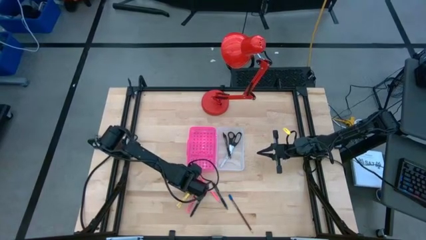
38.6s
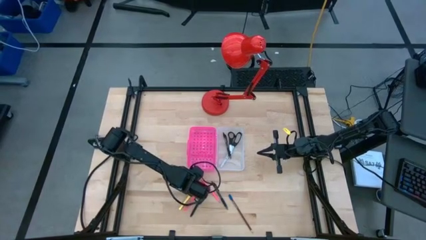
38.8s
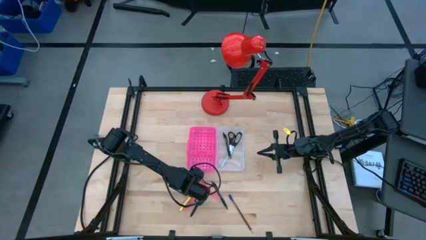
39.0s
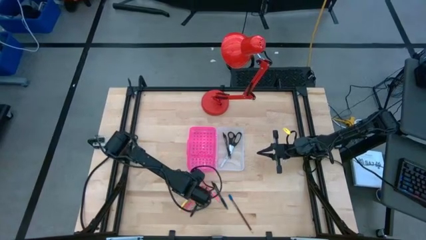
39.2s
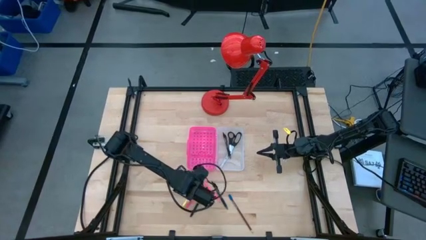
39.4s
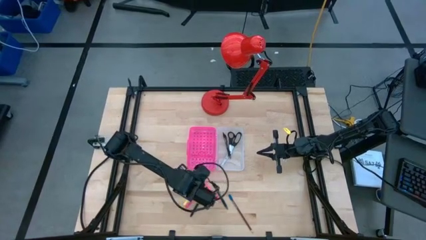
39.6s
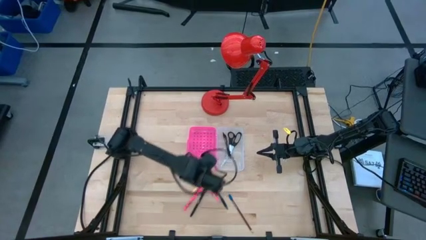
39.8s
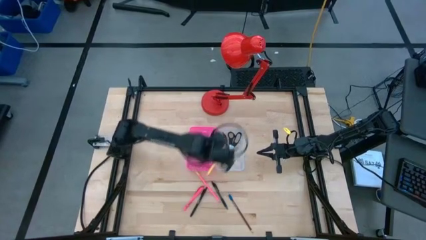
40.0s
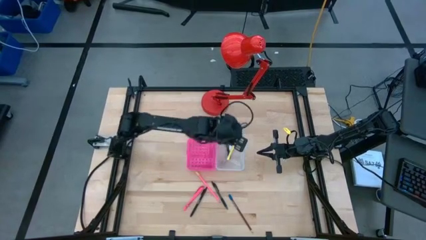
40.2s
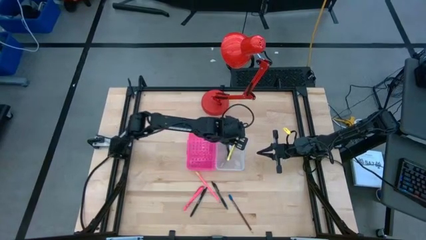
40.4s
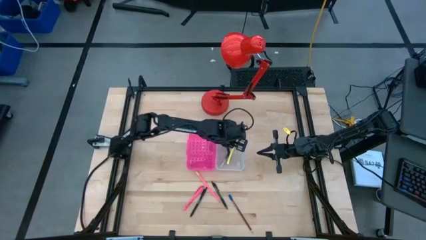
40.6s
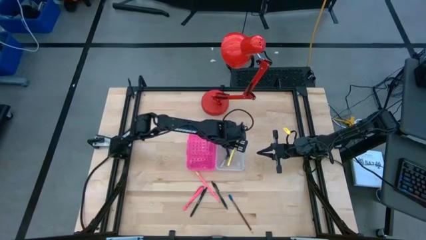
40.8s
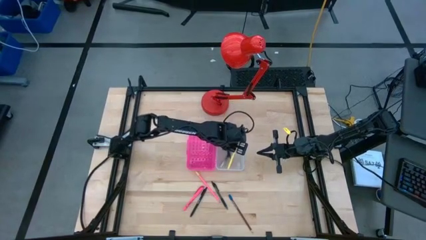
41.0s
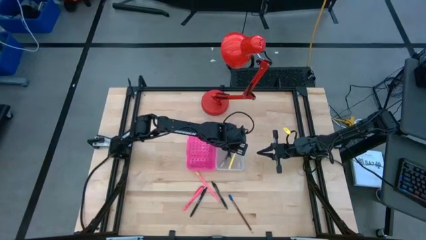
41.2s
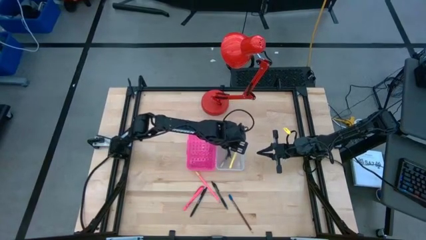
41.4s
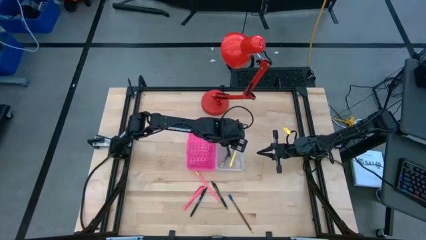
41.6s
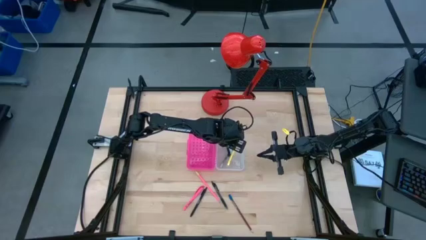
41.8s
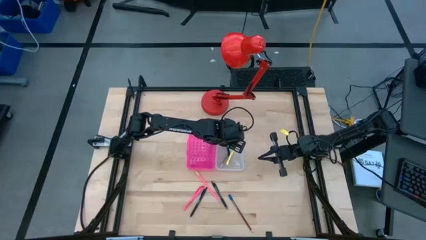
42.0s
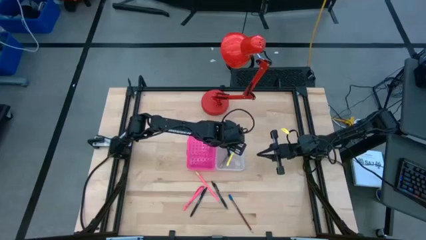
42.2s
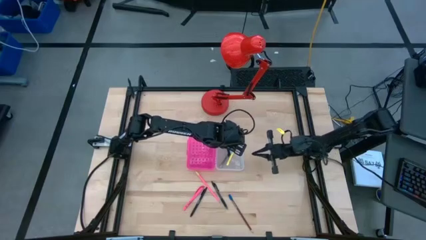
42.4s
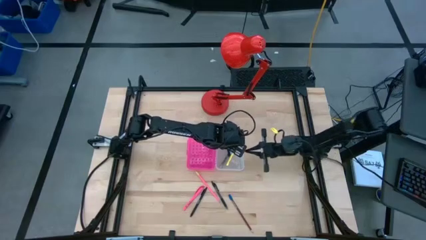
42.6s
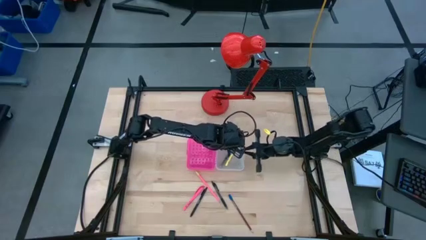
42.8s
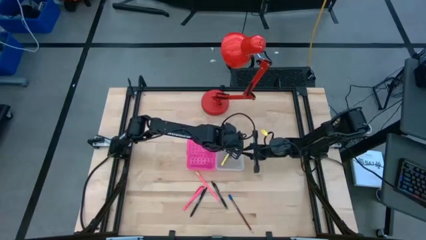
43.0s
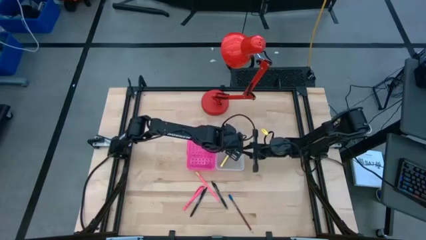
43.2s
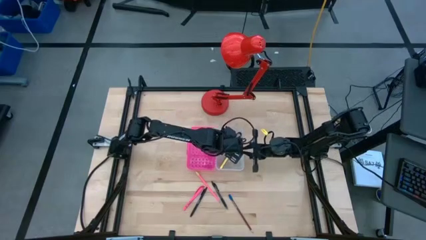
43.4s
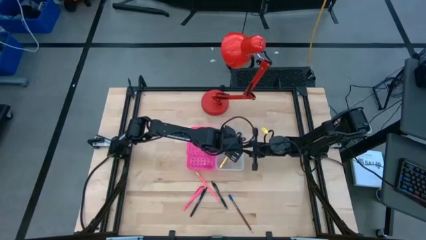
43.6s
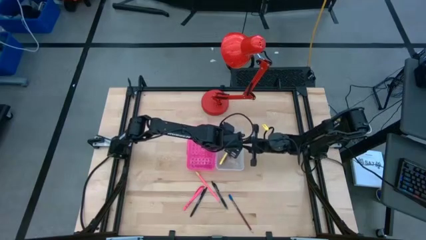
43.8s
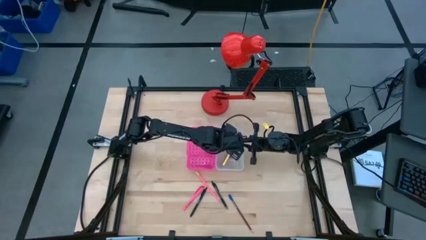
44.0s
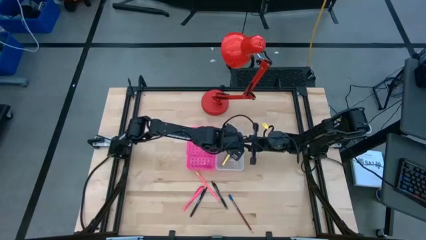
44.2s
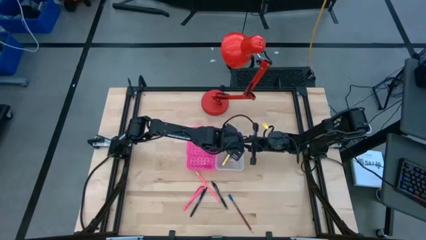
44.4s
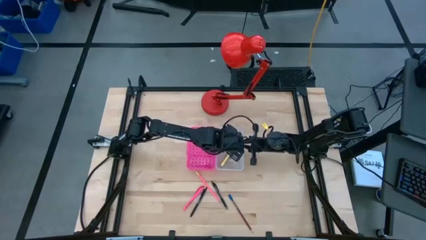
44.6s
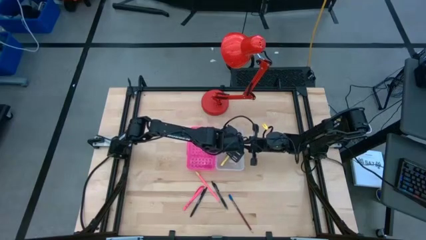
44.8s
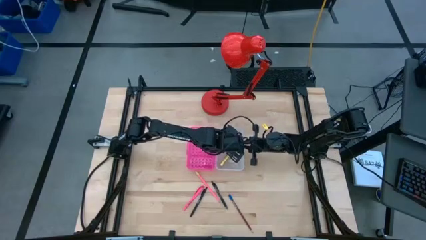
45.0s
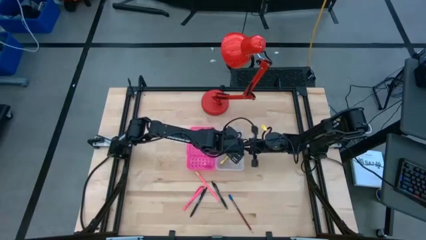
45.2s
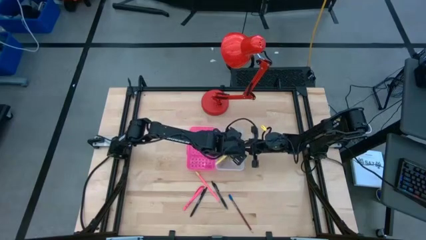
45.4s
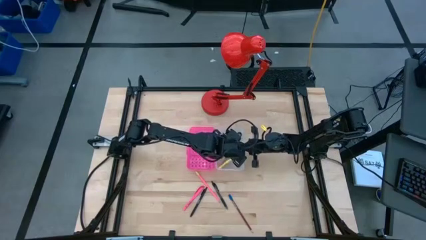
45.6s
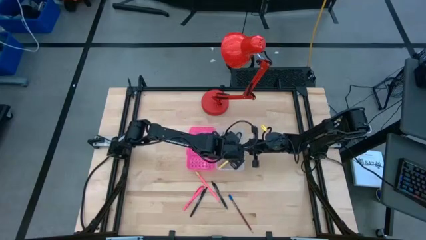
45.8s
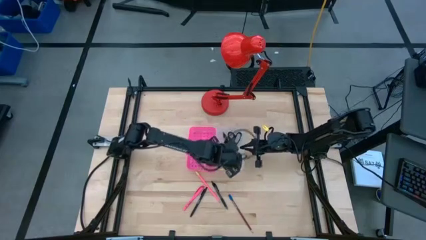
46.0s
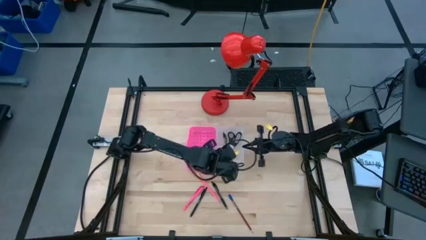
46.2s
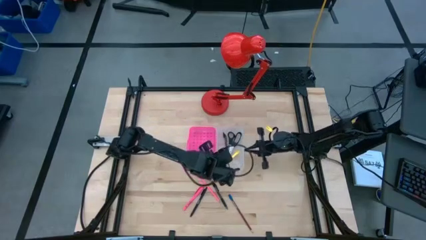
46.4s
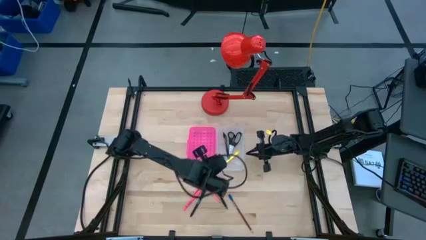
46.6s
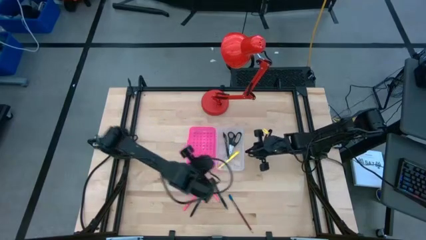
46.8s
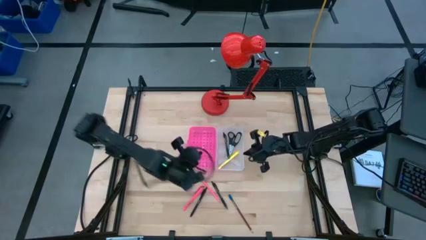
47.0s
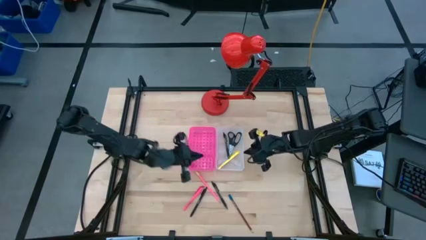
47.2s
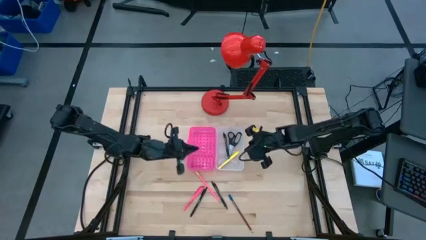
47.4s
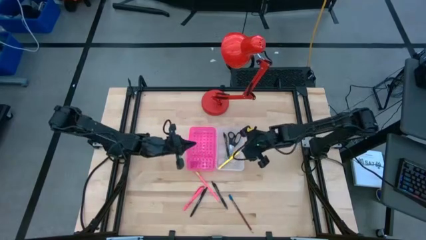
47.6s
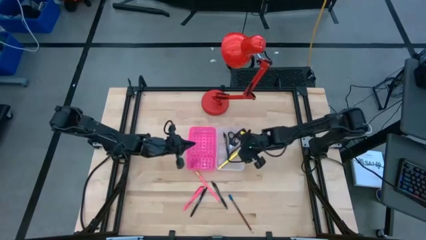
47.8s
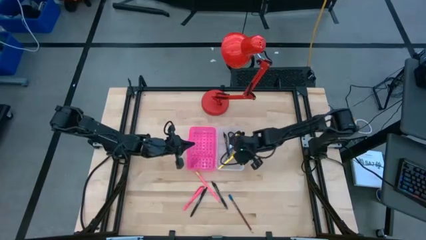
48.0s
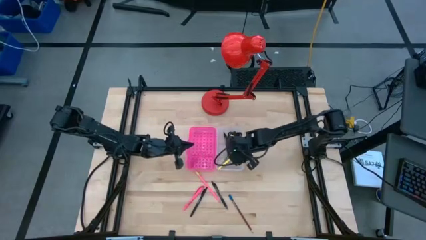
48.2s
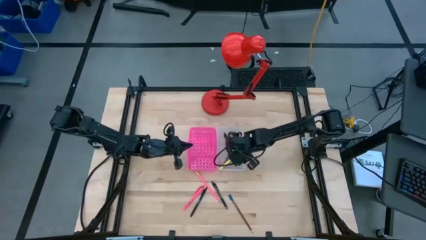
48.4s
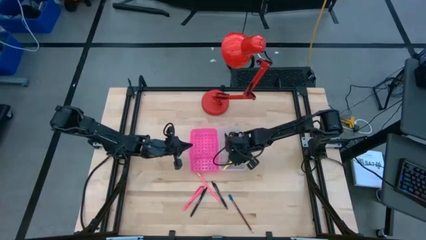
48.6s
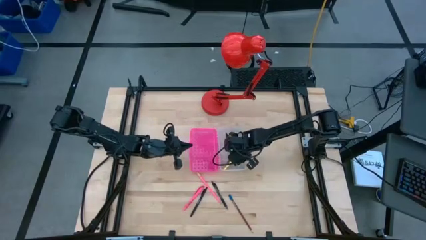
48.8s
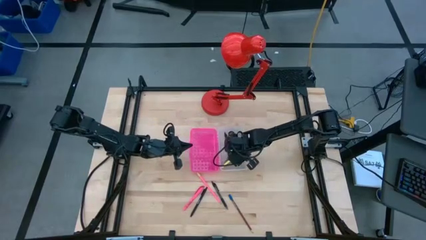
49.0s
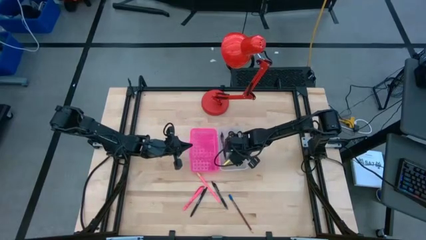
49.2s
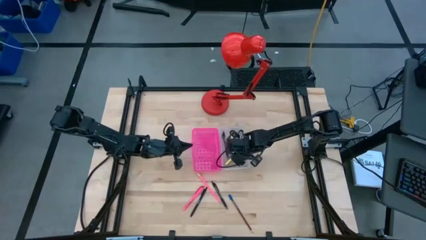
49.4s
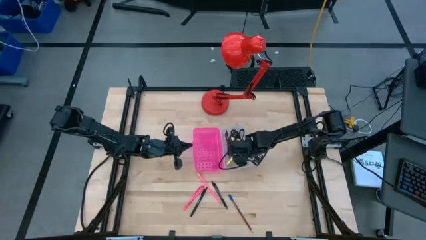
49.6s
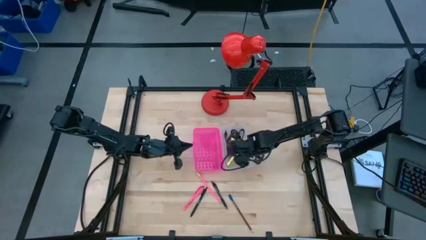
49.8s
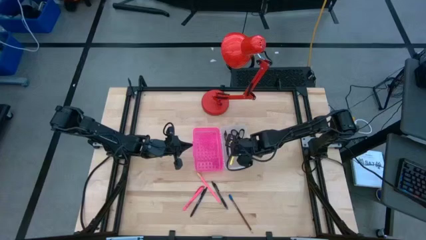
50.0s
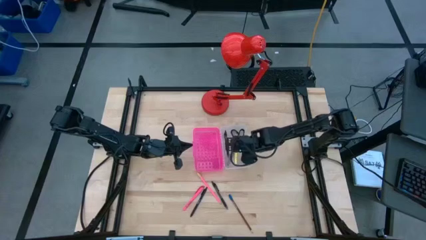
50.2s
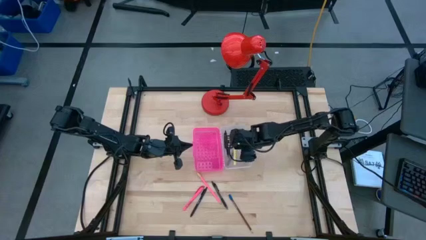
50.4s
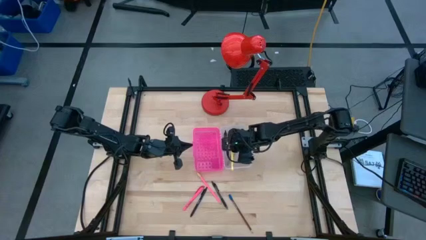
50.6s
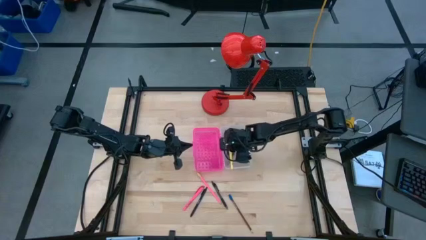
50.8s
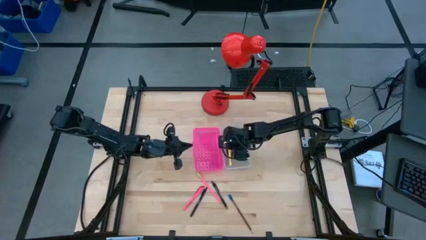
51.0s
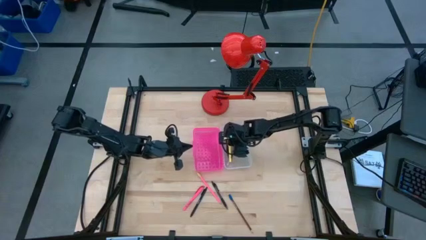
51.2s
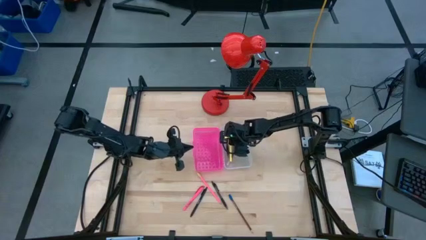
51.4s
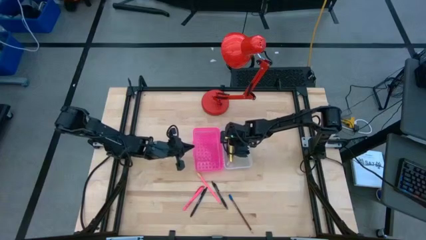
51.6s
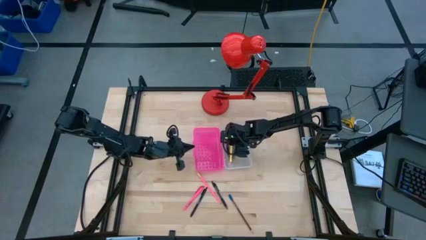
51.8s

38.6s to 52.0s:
Task: Pick & place school supplies into a supply box
Put the yellow pen into the pink supply box

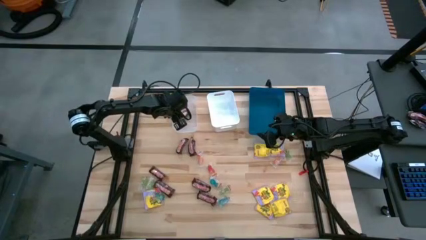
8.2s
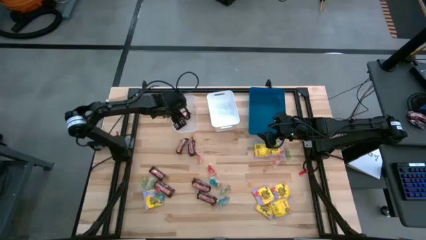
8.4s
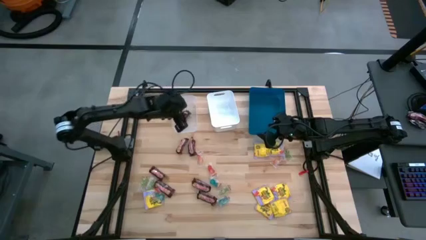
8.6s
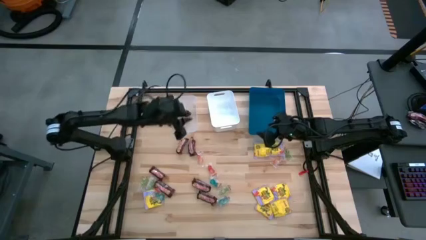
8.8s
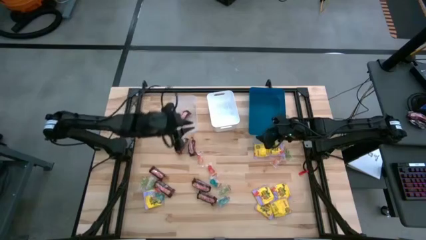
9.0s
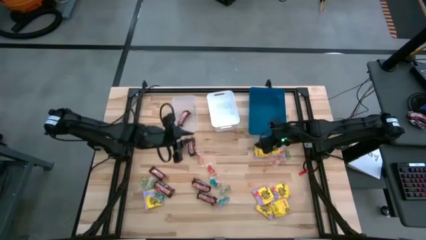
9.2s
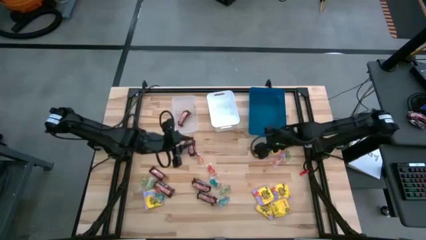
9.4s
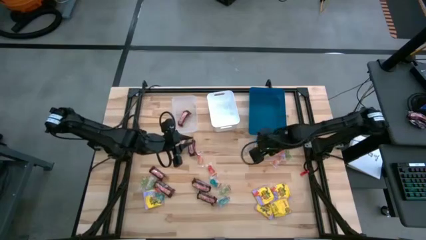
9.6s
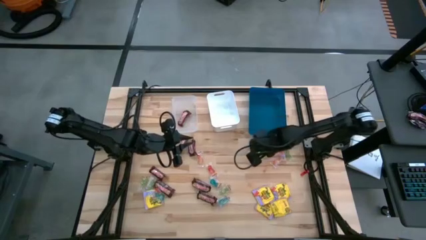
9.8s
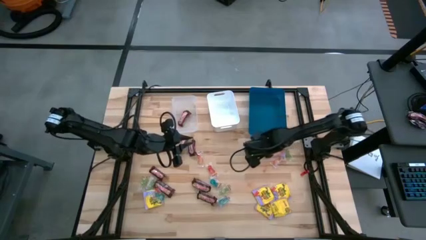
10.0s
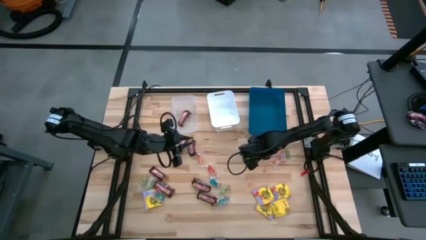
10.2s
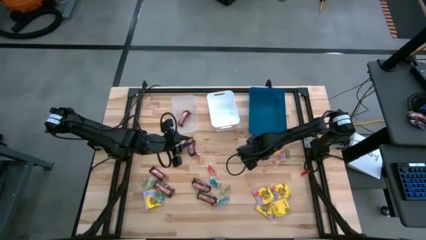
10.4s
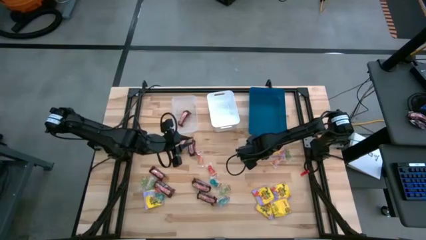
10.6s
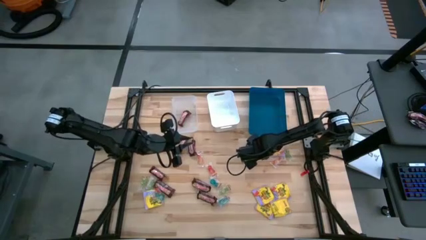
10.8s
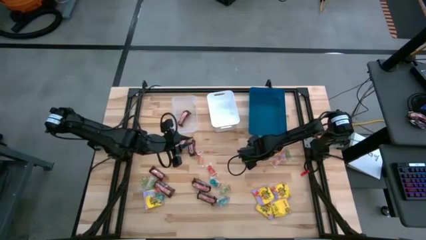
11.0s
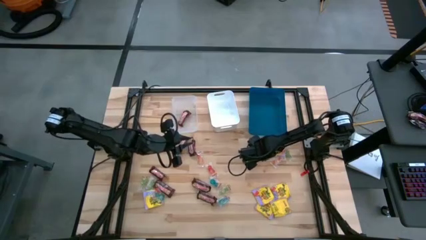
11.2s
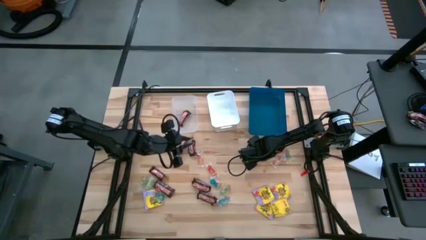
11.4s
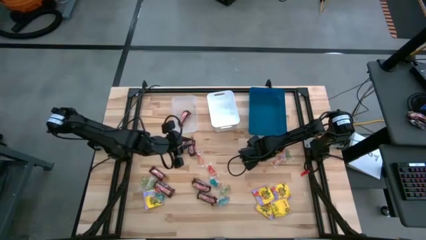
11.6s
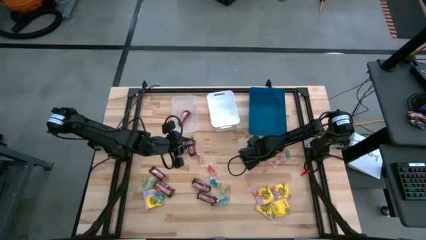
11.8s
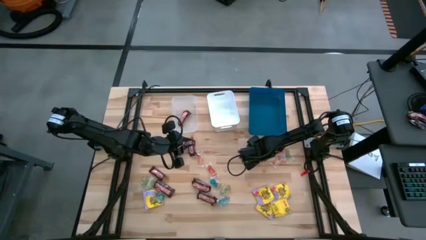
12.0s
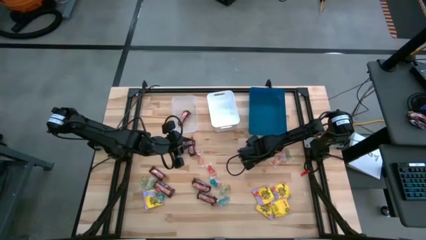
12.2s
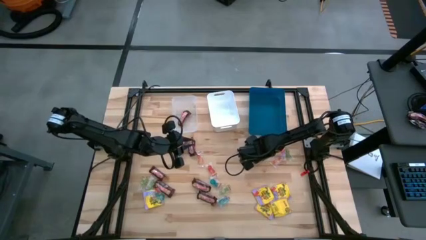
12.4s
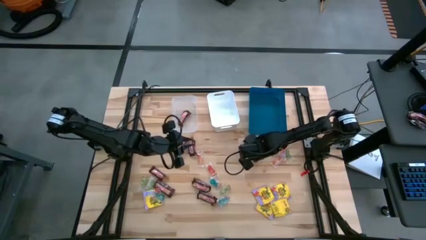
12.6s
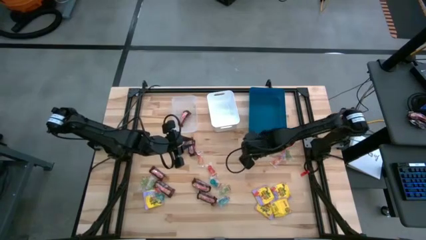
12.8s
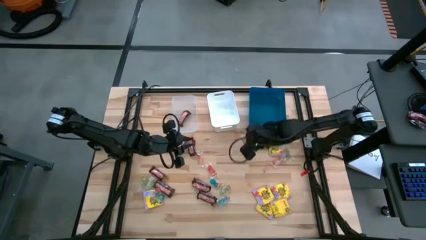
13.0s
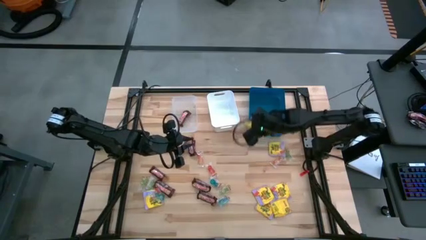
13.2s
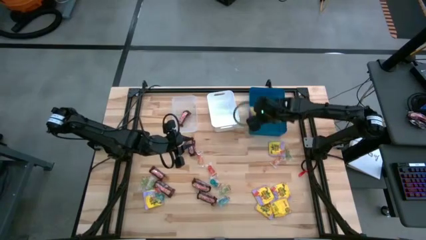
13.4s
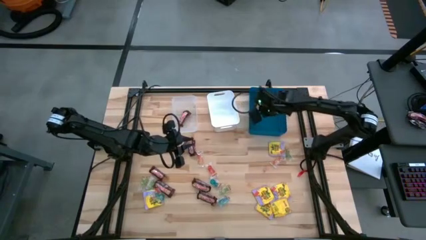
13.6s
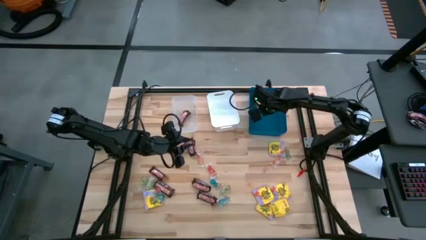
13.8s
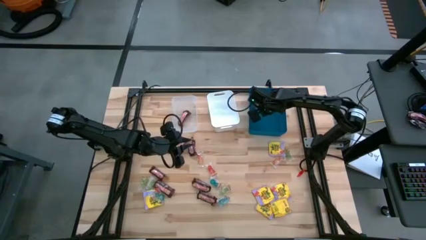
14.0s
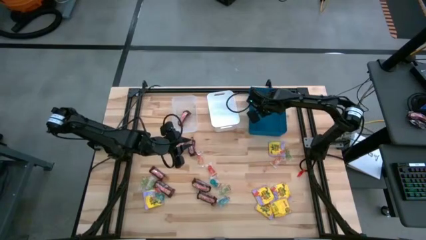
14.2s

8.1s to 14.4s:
Task: Sort candy
Put the middle right yellow sour patch candy into the blue bin
